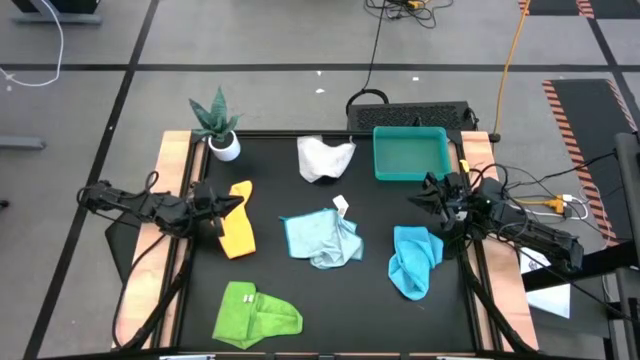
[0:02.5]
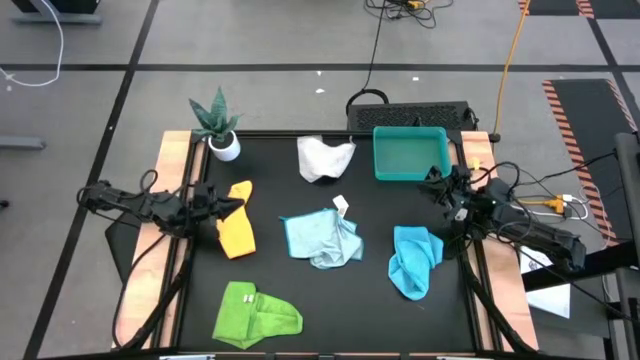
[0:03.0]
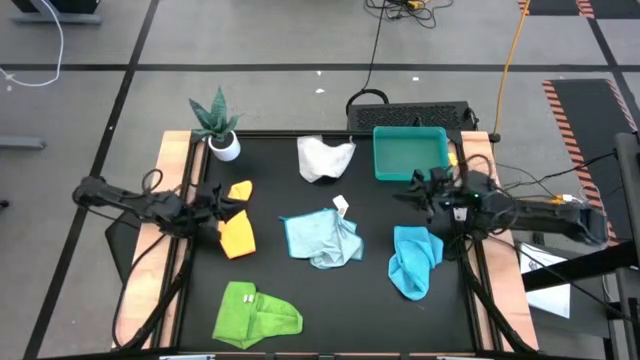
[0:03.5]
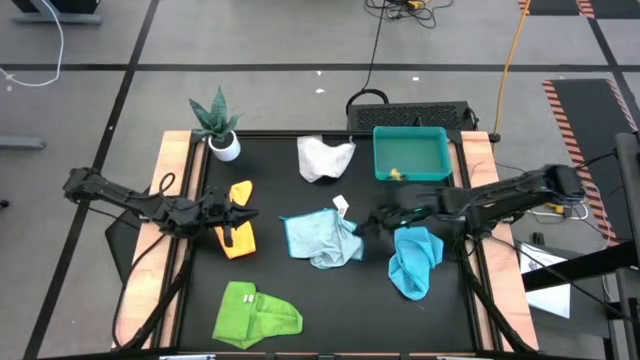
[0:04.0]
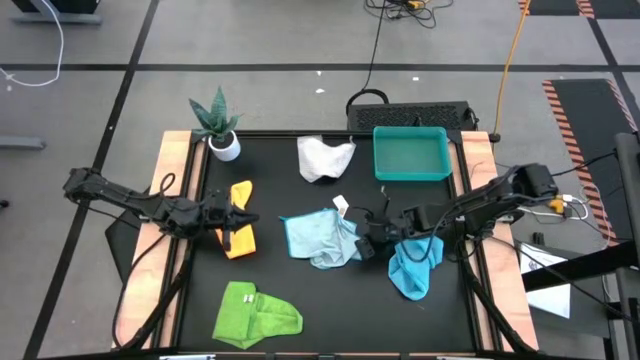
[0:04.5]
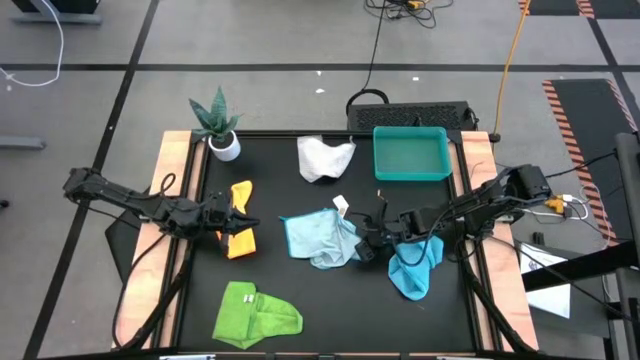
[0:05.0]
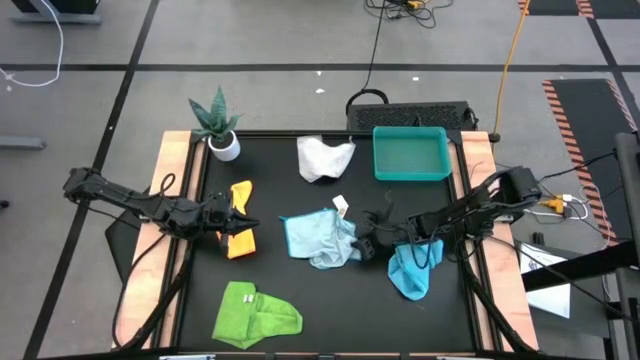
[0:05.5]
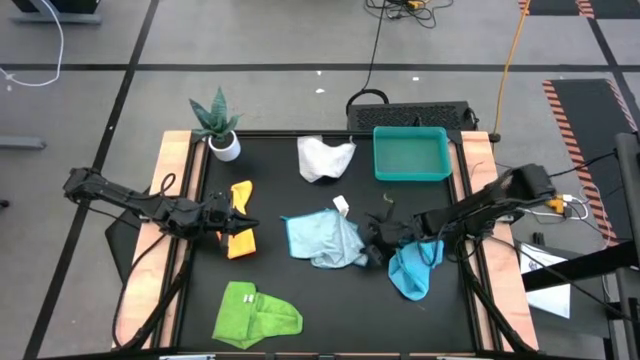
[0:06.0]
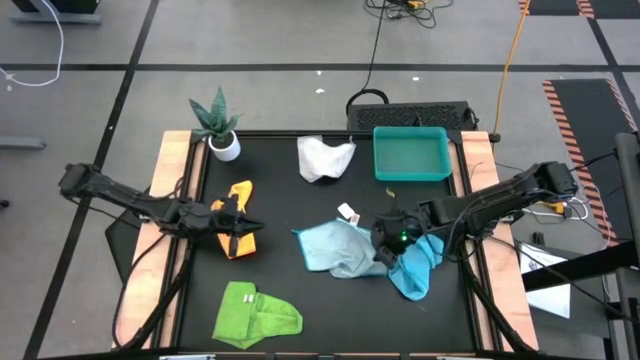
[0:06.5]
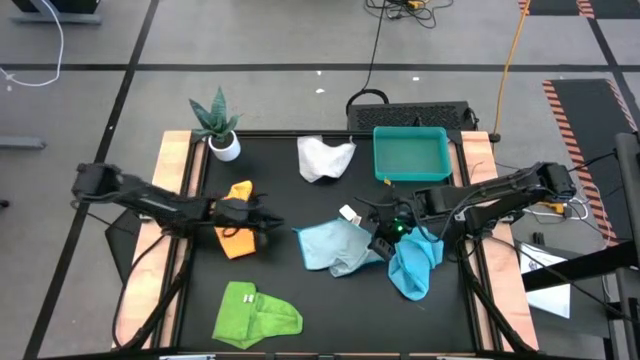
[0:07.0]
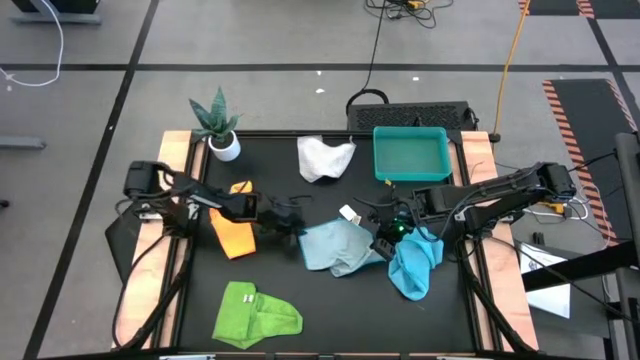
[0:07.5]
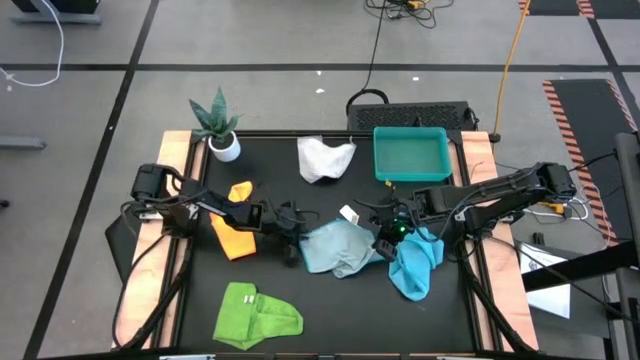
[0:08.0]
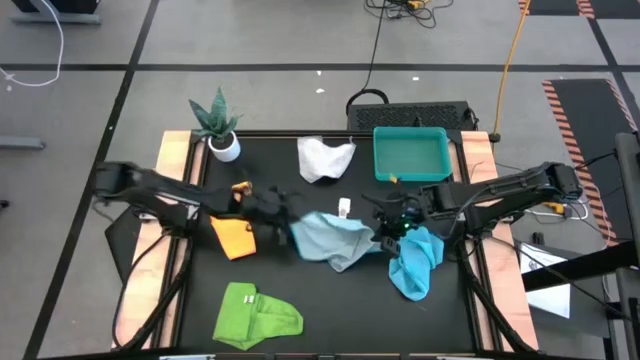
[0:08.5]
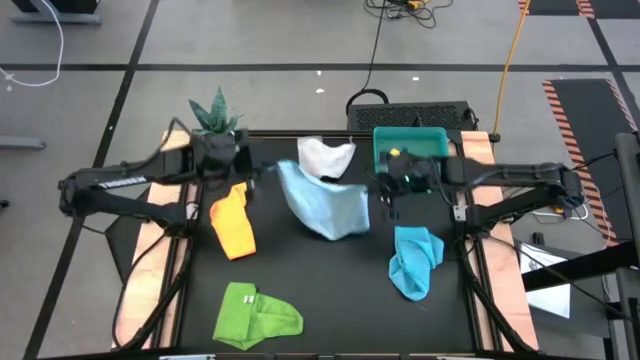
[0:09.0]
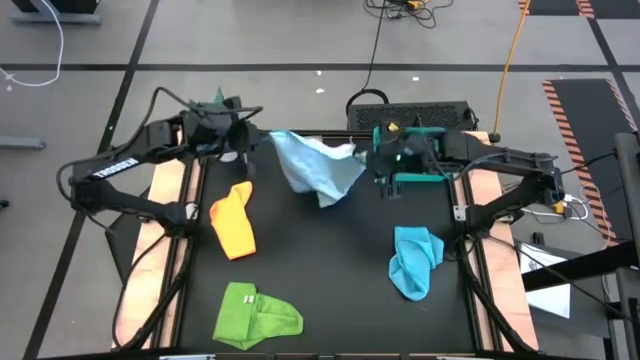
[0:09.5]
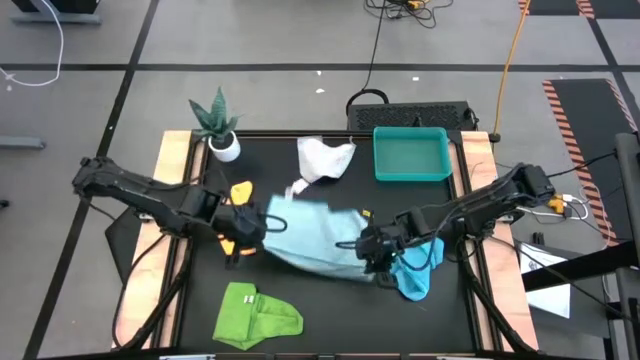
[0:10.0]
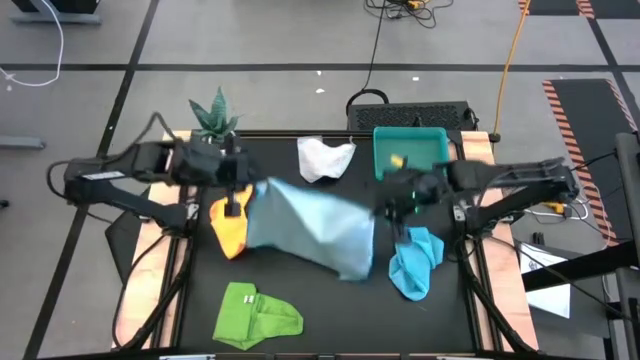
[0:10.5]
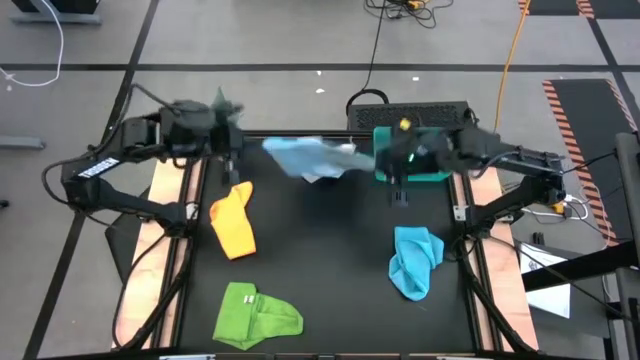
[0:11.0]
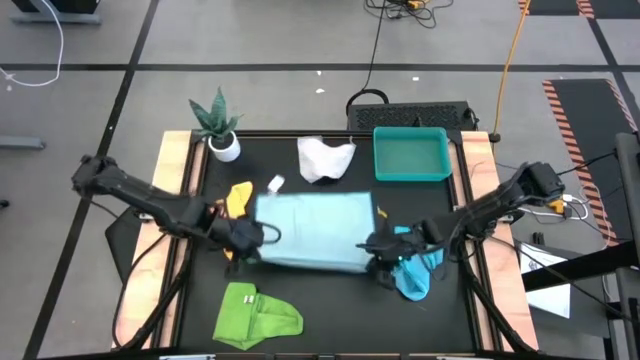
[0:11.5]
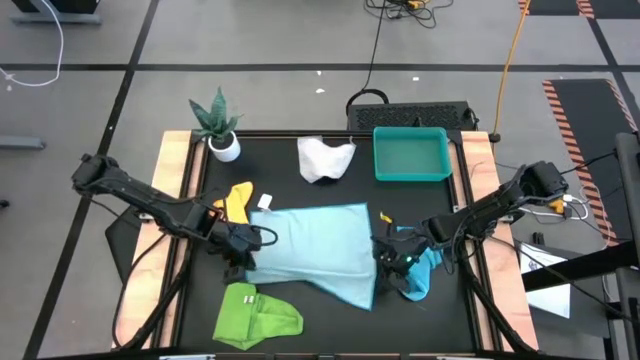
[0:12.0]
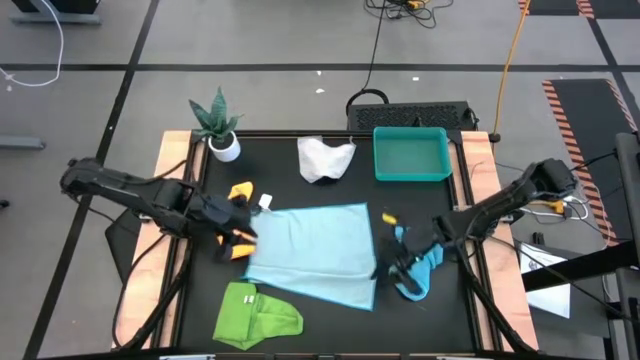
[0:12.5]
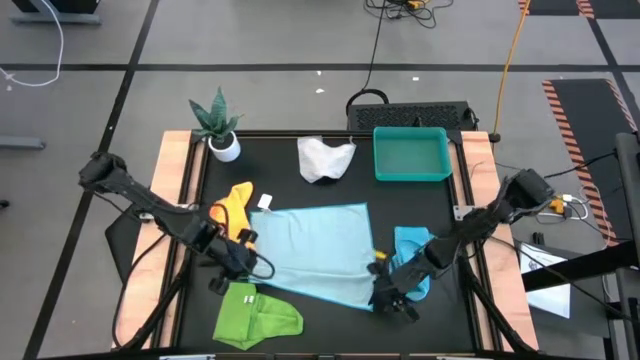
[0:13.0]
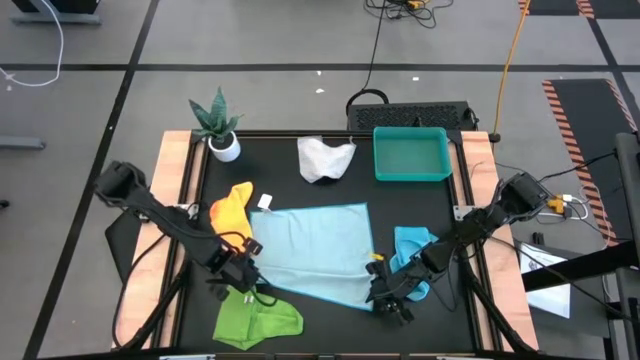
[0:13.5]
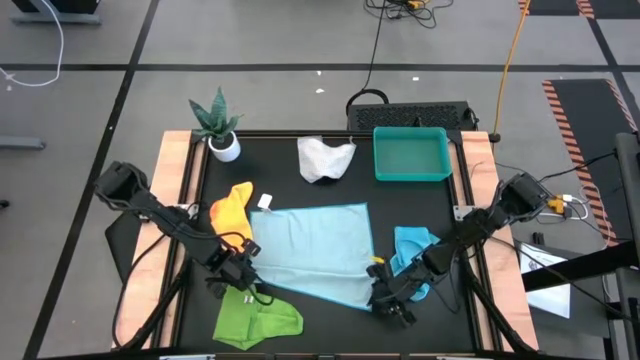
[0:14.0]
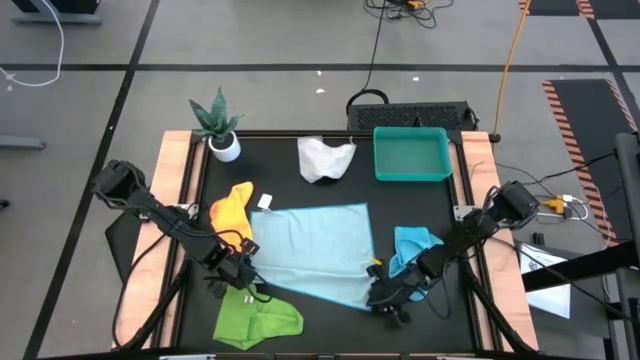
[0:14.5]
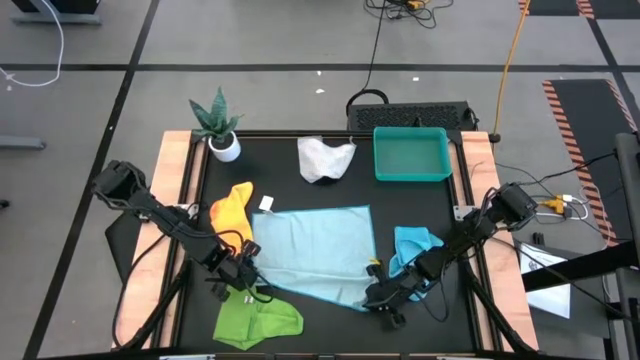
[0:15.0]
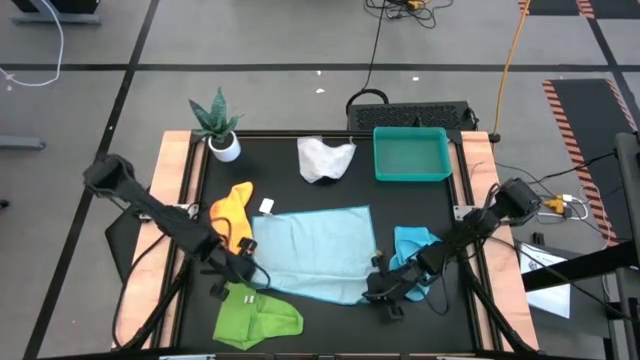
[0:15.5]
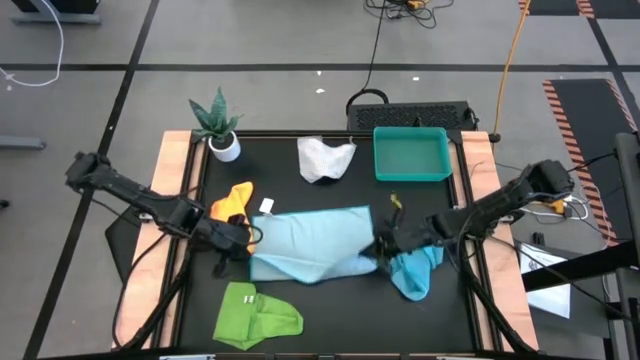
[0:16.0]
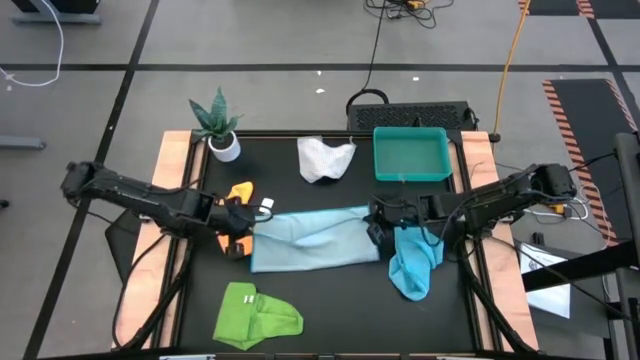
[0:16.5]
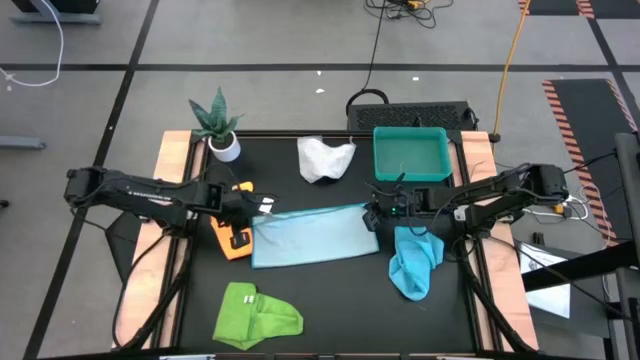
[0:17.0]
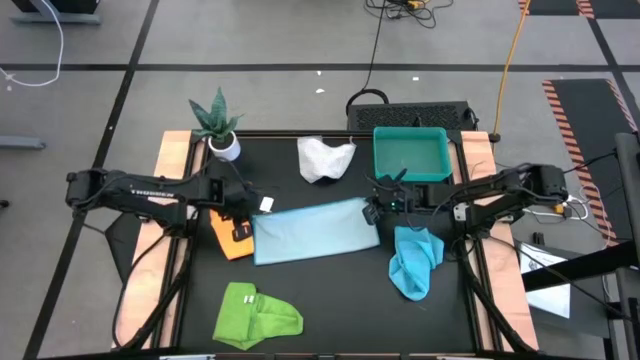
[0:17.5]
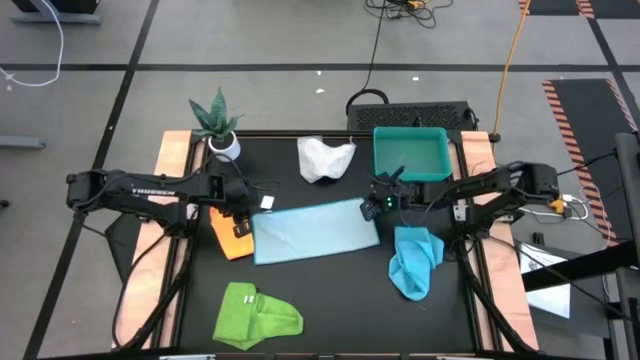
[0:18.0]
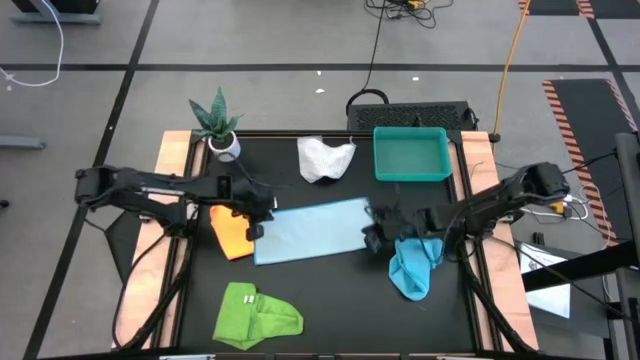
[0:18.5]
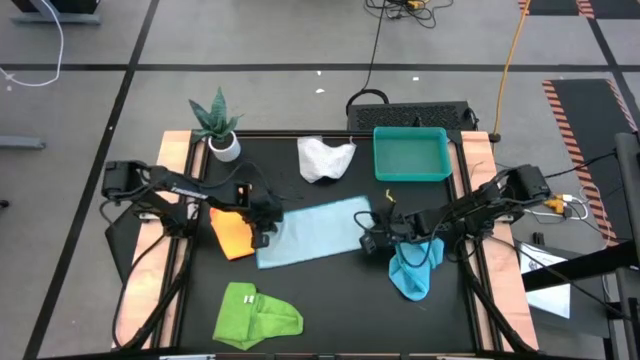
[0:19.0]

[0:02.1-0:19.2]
Task: Fold microfiber towels
Fold the blue microfiber towel

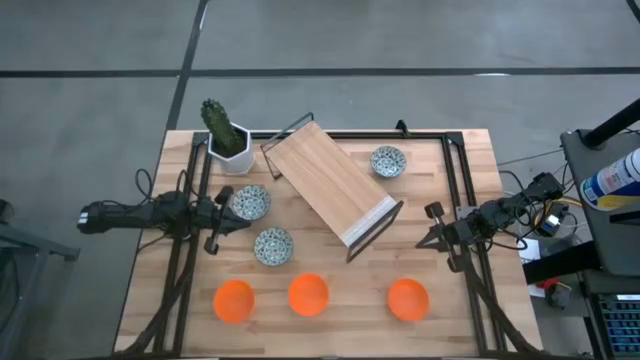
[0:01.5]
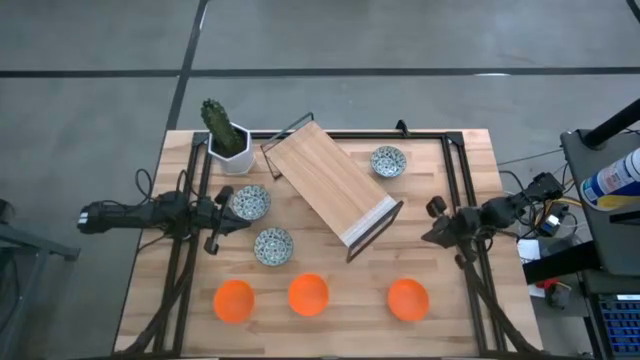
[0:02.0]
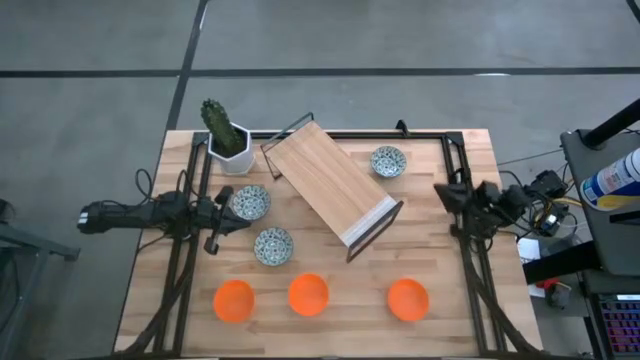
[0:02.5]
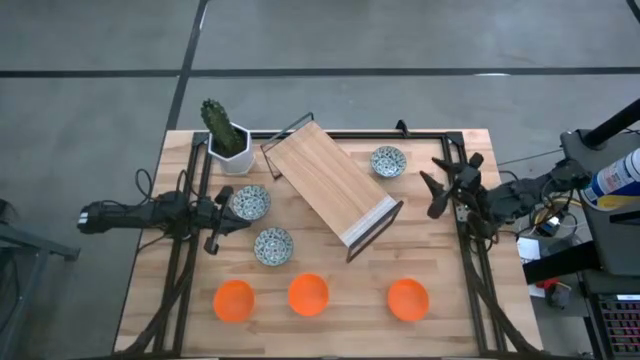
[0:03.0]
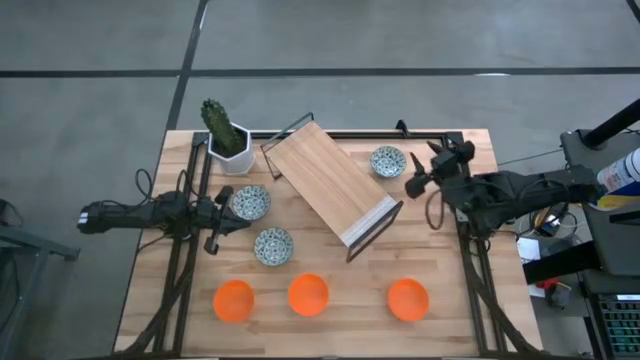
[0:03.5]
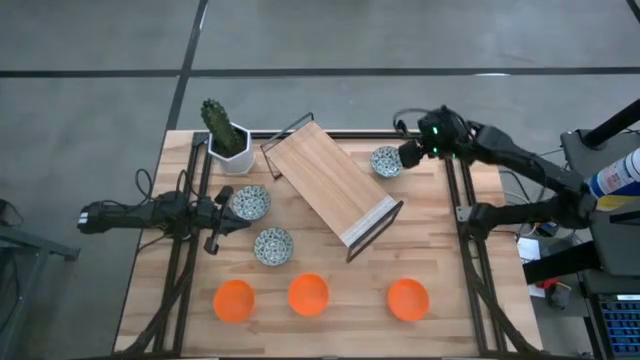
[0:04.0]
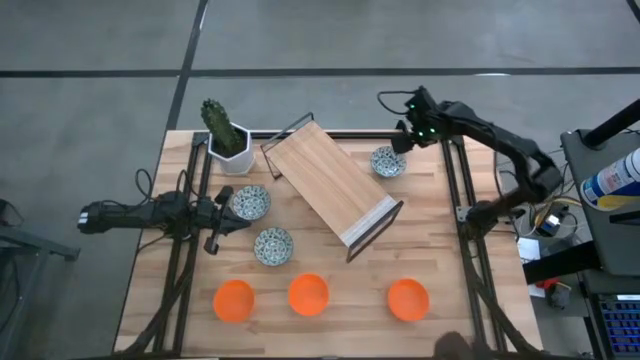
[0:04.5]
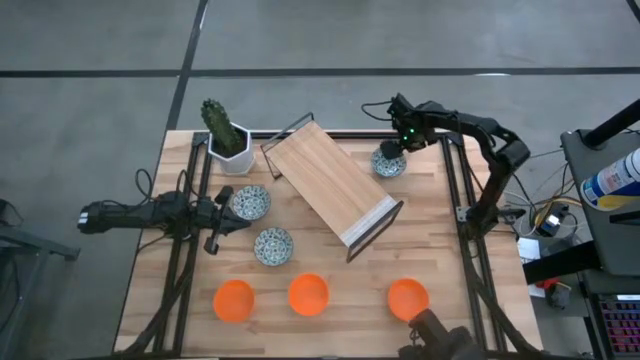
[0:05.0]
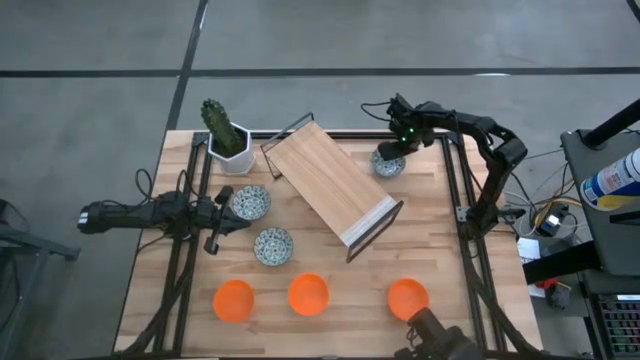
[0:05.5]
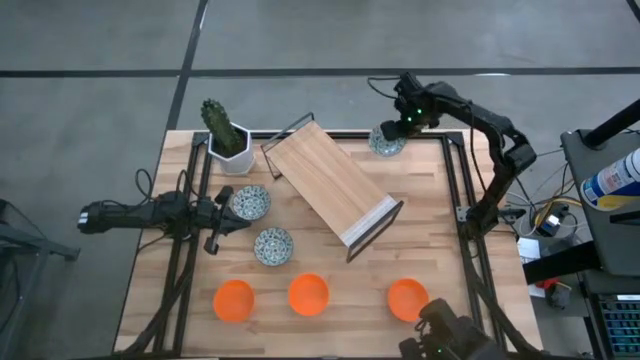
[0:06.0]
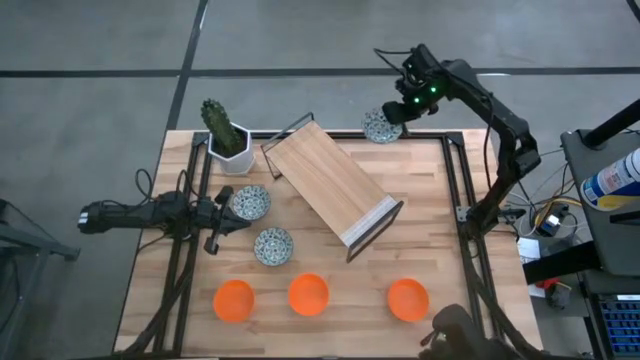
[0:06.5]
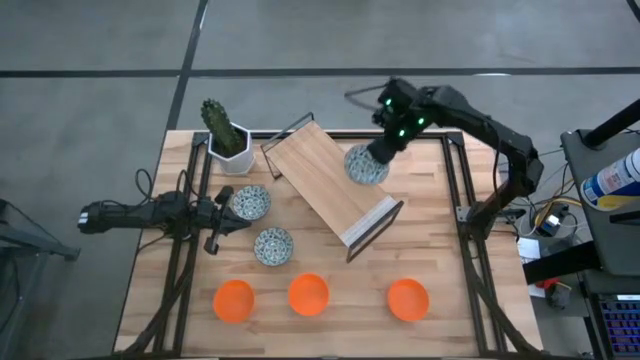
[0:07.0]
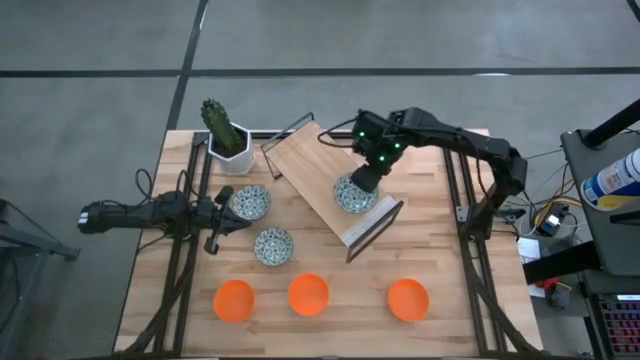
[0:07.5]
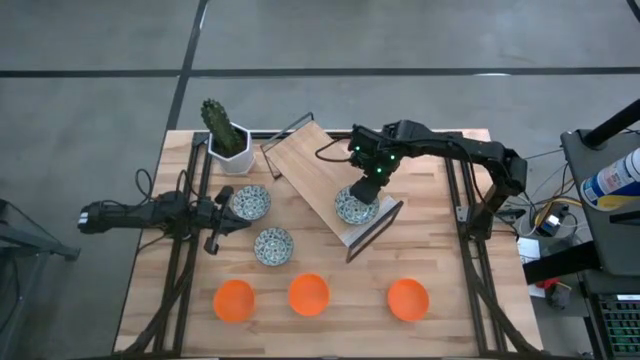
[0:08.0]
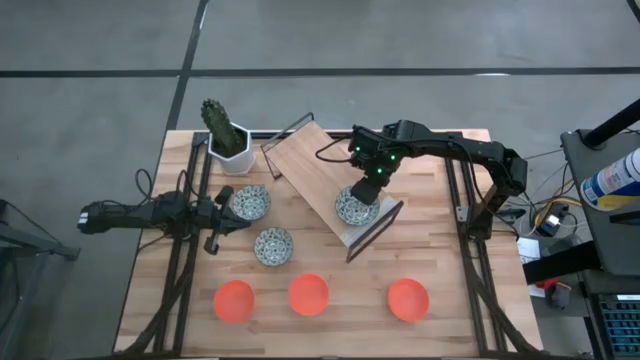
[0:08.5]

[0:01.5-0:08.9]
Task: Pick & Place Mini bowls
Put the top right blue patterned bowl on the shelf
